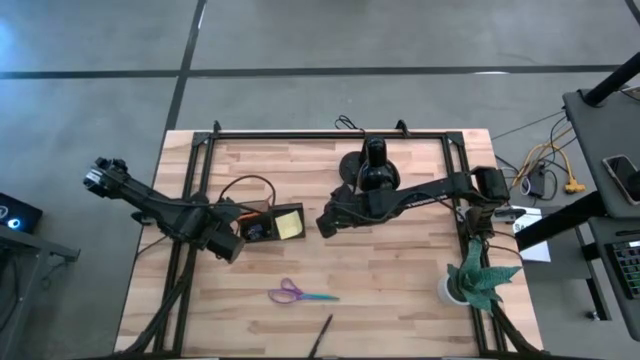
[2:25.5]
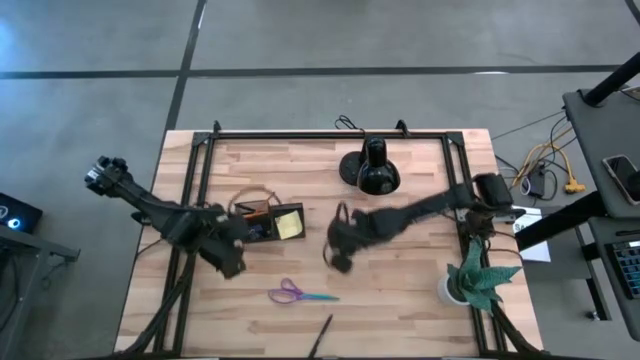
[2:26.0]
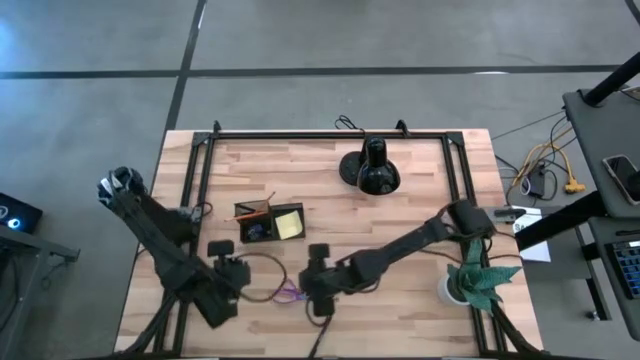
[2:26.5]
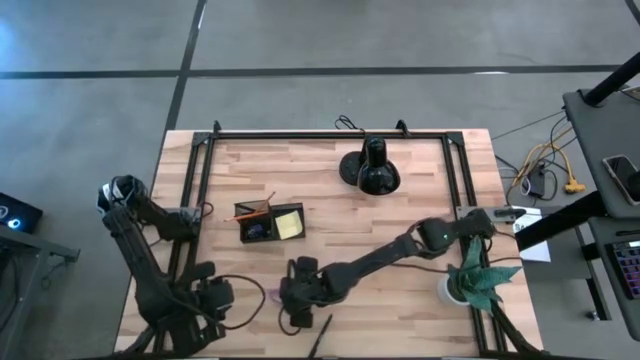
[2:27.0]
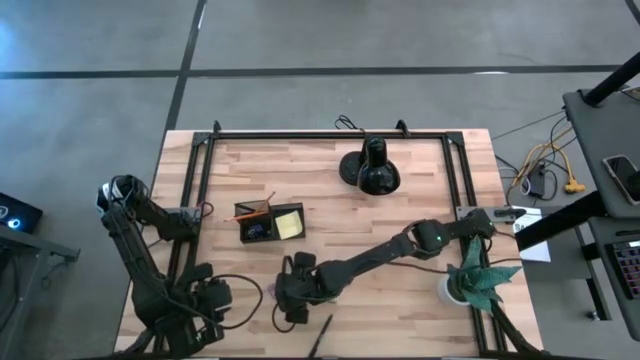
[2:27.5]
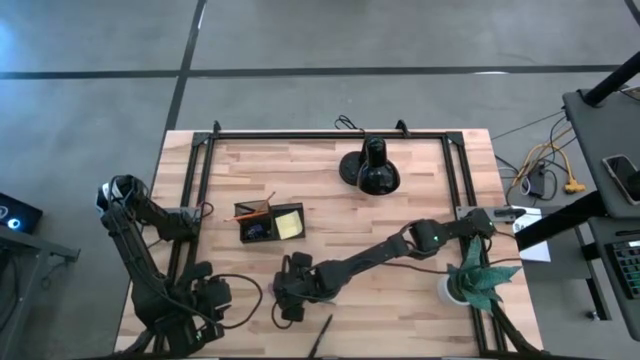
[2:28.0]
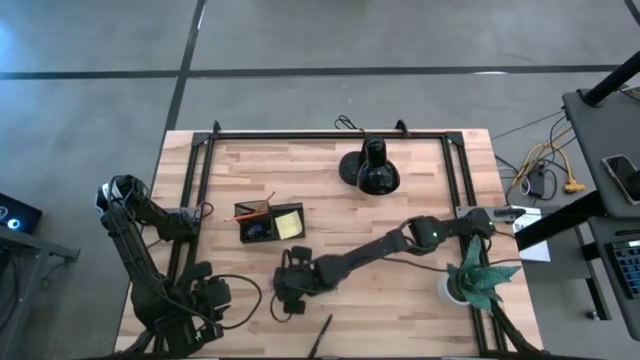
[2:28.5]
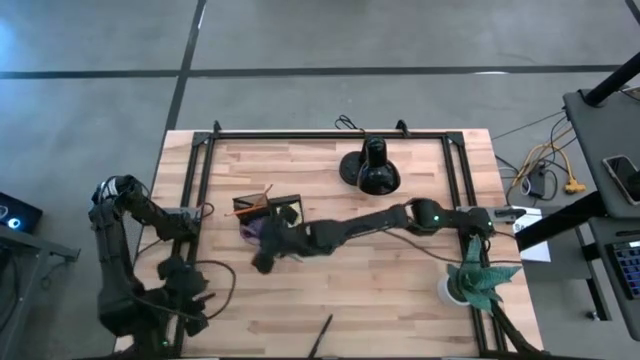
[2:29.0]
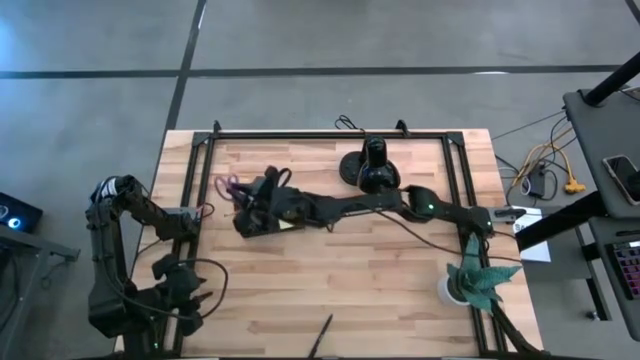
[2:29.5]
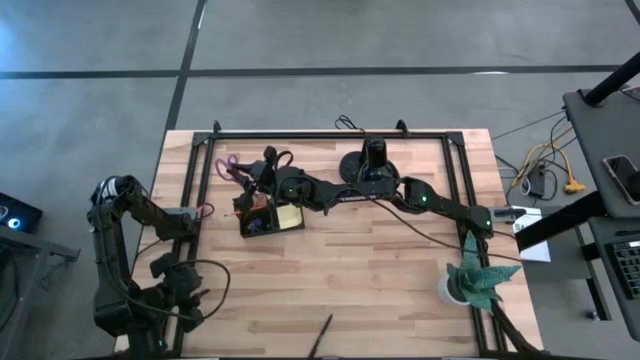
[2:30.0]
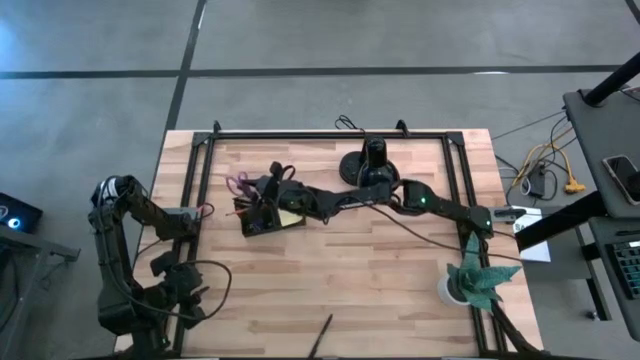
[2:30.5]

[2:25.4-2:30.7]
Task: Pick and place office supplies into organizer
Put the purple scissors into the black desk organizer

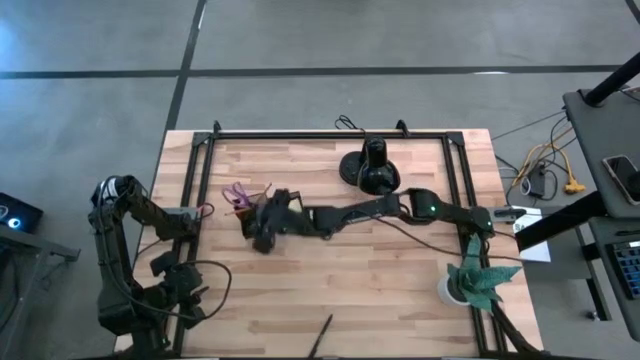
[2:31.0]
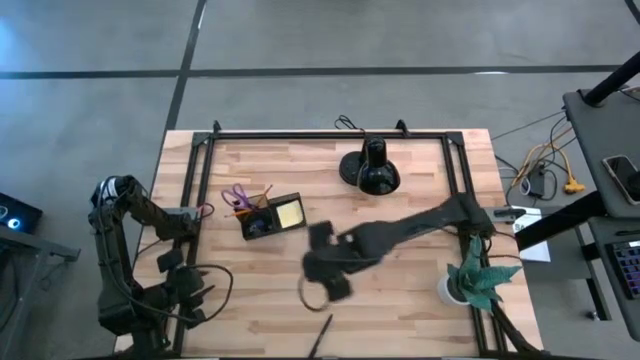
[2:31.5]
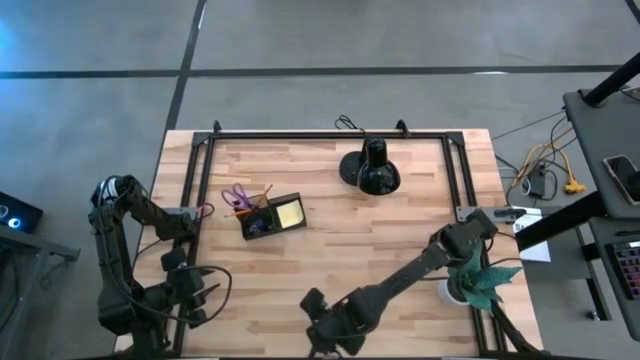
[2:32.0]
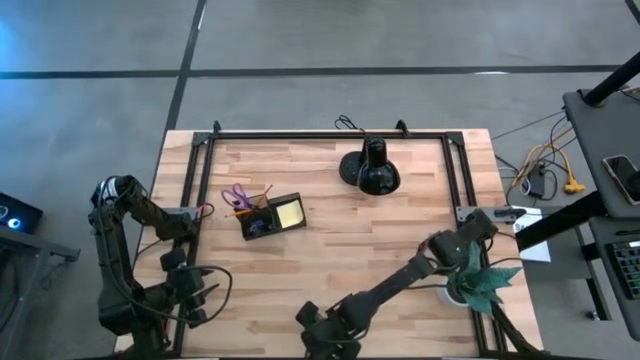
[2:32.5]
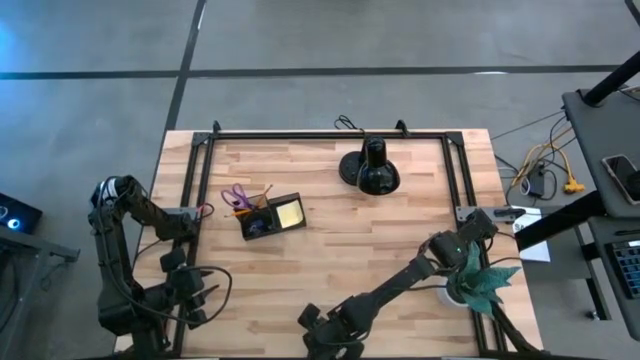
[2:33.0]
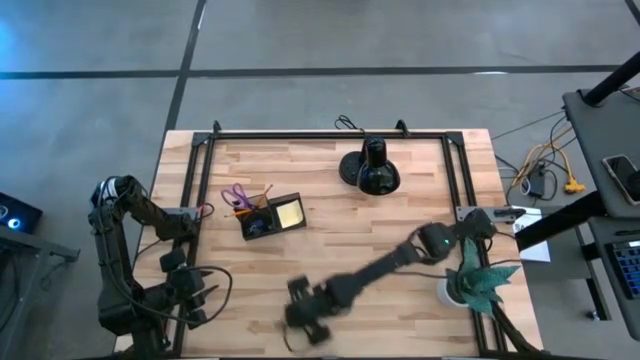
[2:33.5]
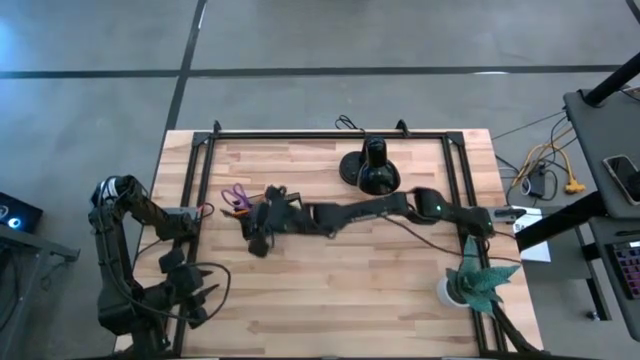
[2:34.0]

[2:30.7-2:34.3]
Put the black pen into the black desk organizer

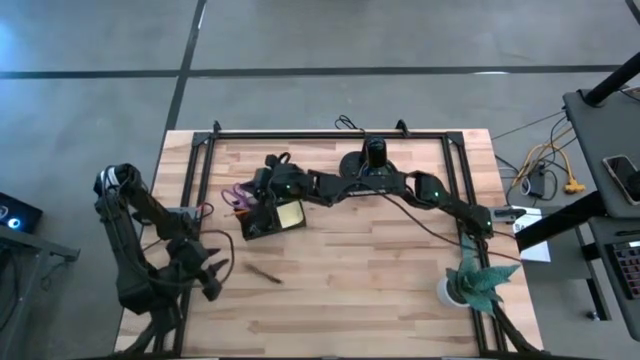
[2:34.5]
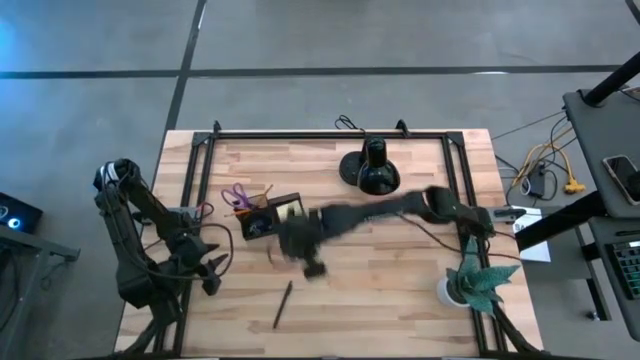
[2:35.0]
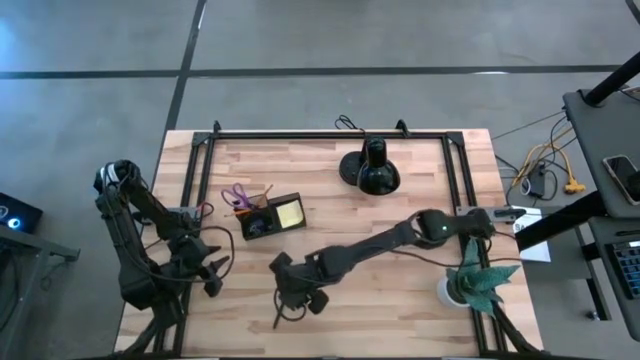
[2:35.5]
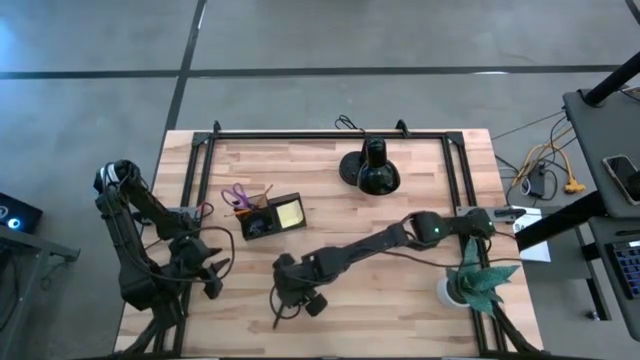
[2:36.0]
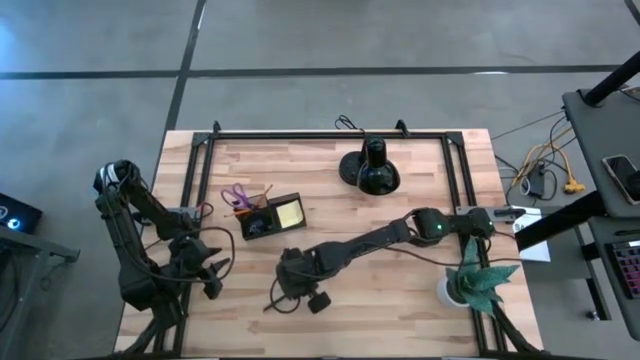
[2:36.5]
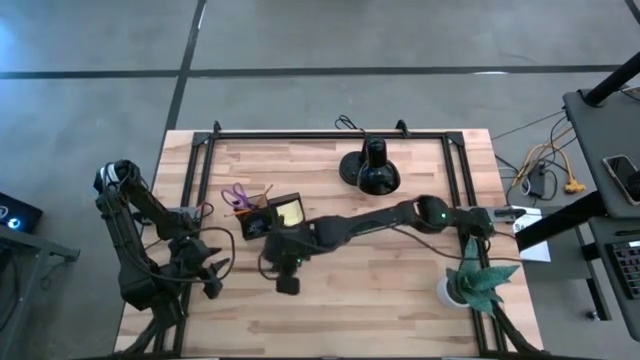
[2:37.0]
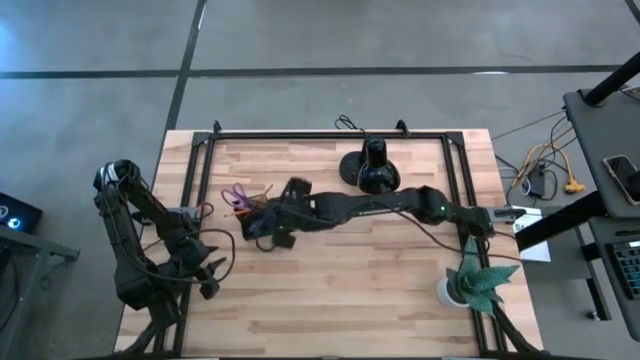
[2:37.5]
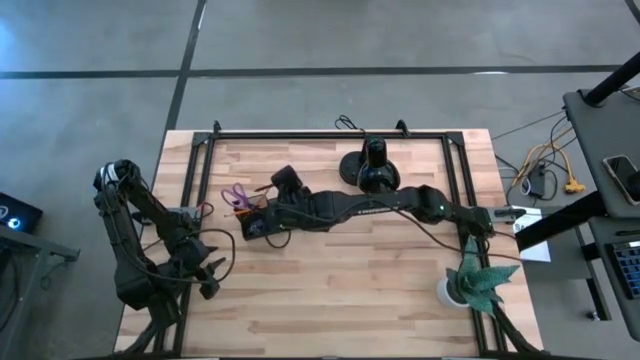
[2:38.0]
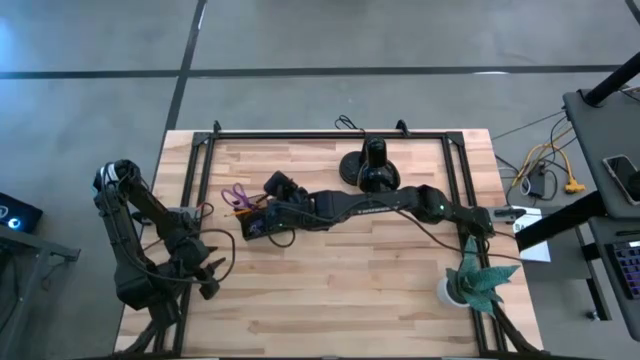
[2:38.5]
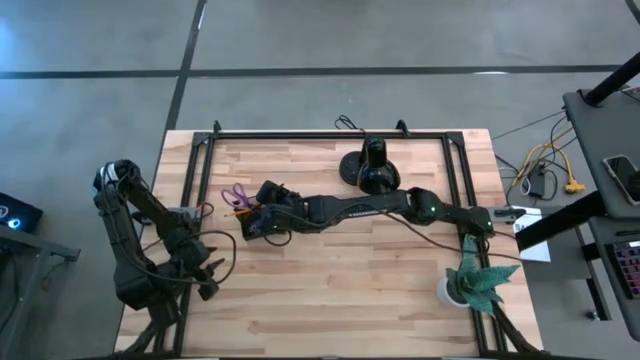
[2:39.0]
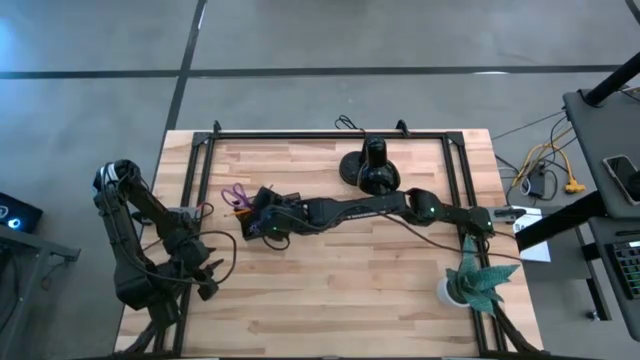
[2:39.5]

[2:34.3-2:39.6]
Put the black pen into the black desk organizer

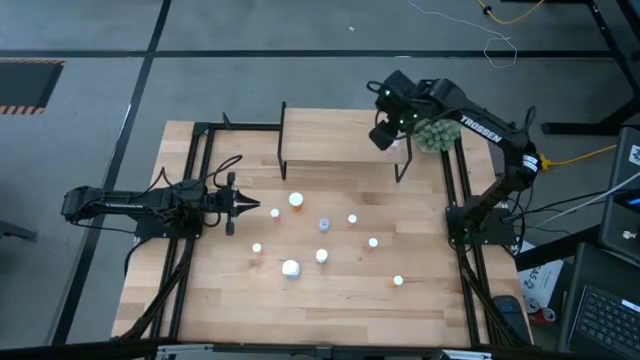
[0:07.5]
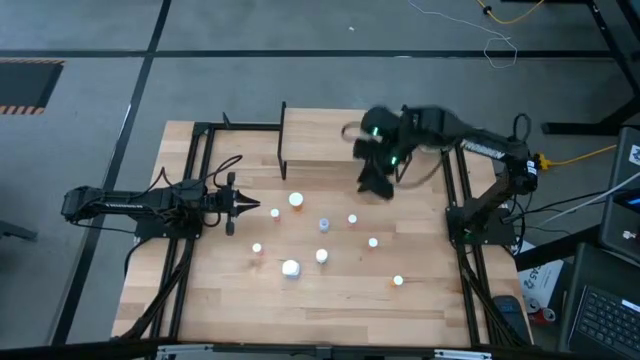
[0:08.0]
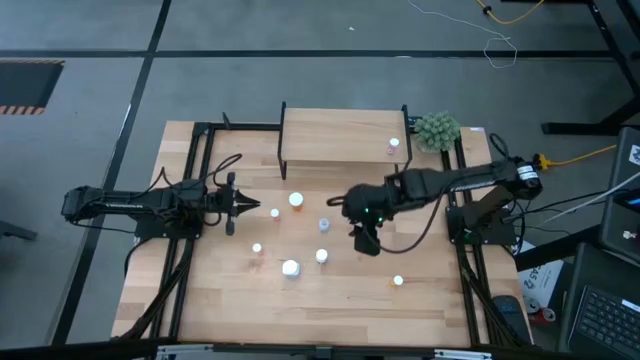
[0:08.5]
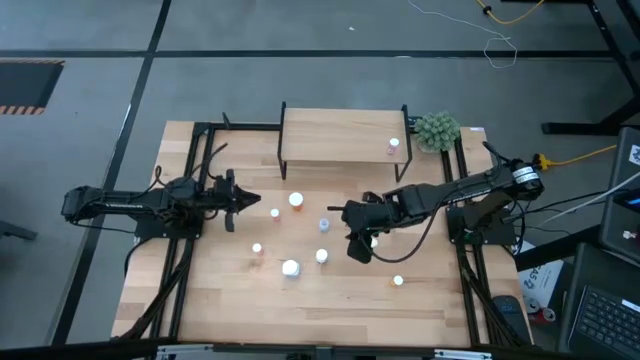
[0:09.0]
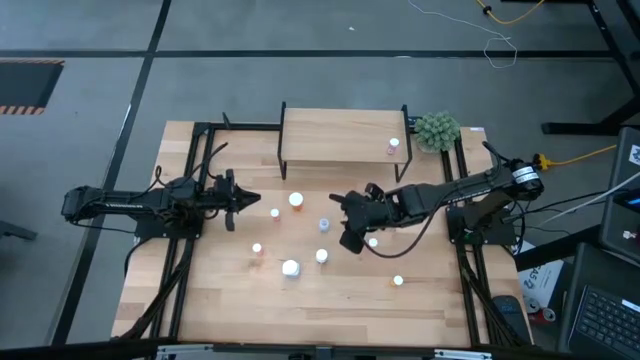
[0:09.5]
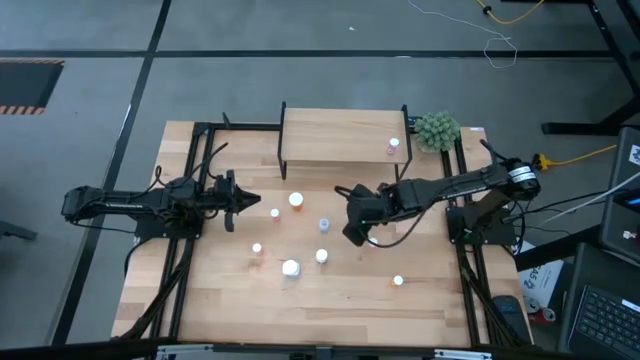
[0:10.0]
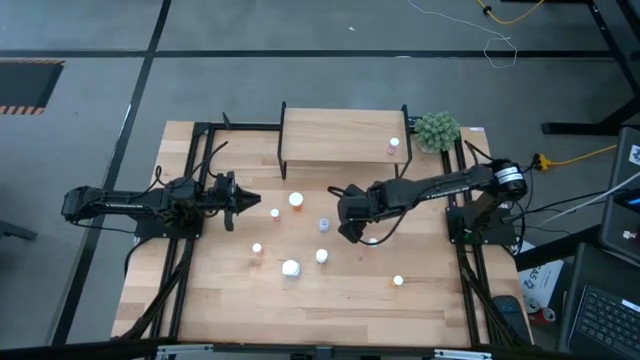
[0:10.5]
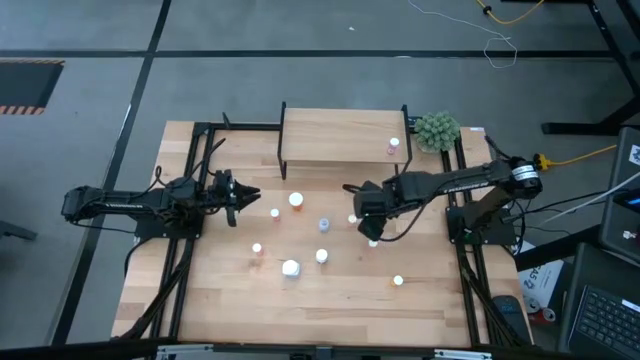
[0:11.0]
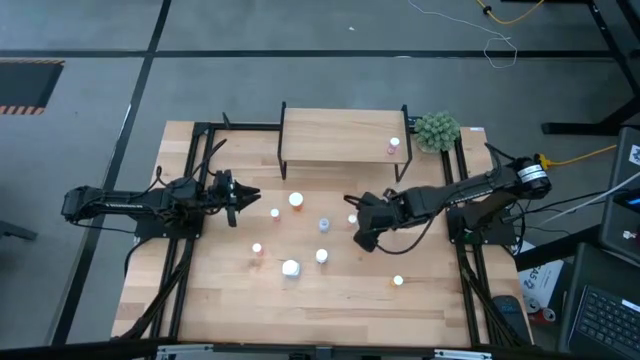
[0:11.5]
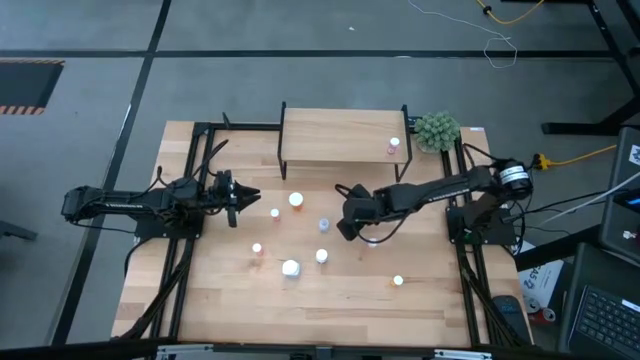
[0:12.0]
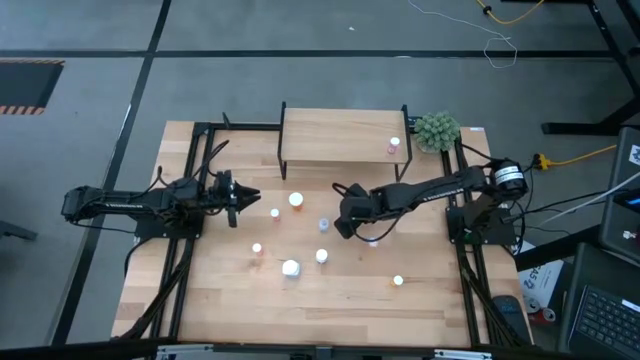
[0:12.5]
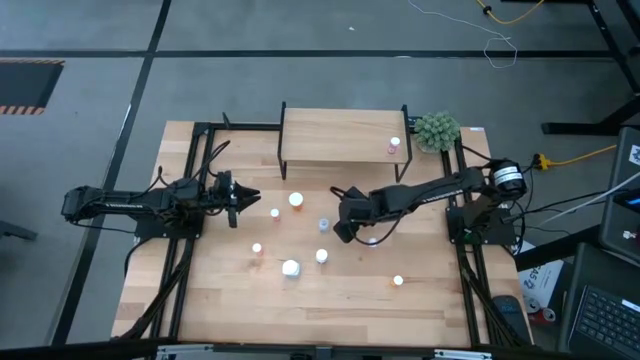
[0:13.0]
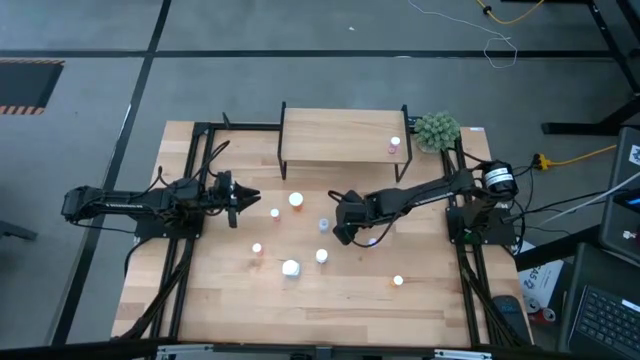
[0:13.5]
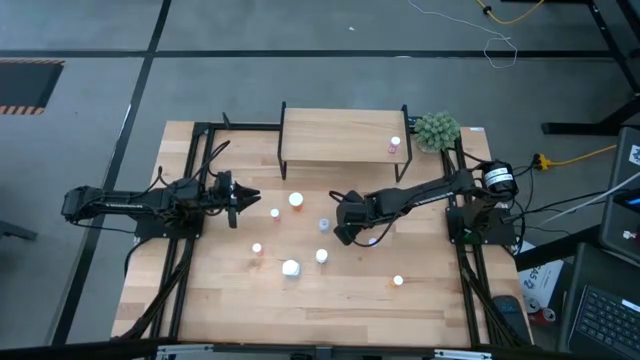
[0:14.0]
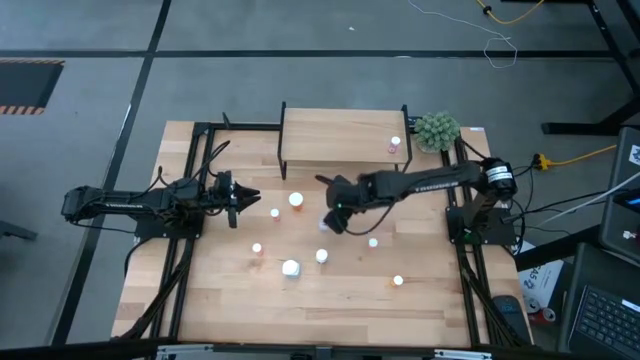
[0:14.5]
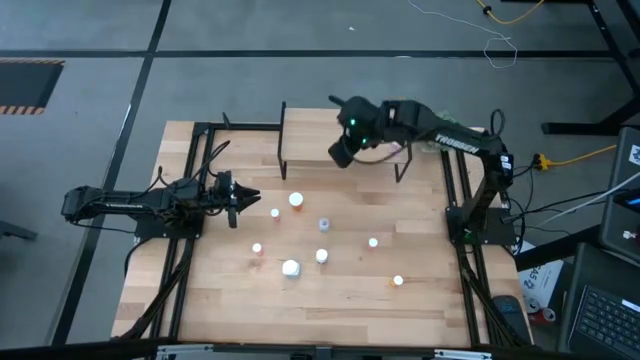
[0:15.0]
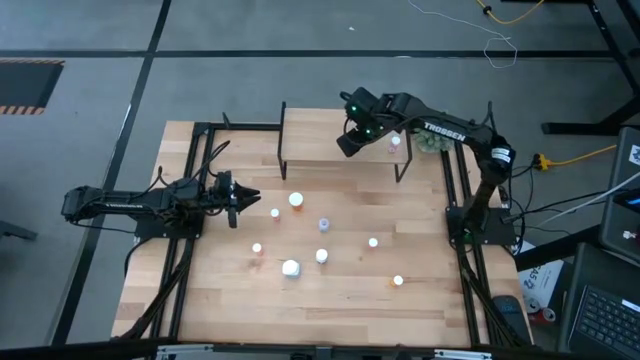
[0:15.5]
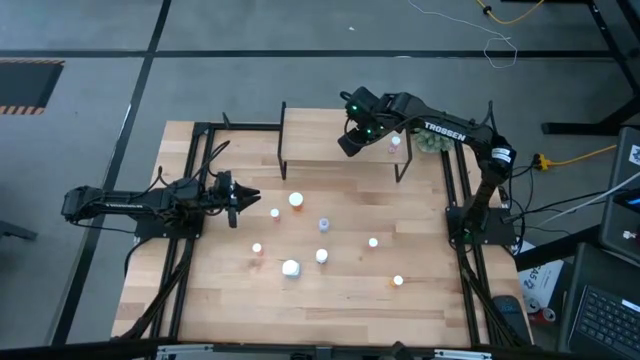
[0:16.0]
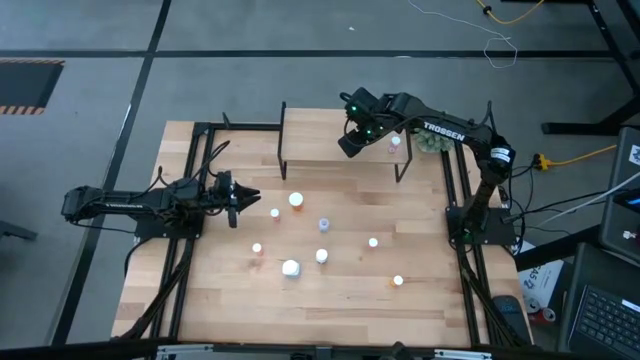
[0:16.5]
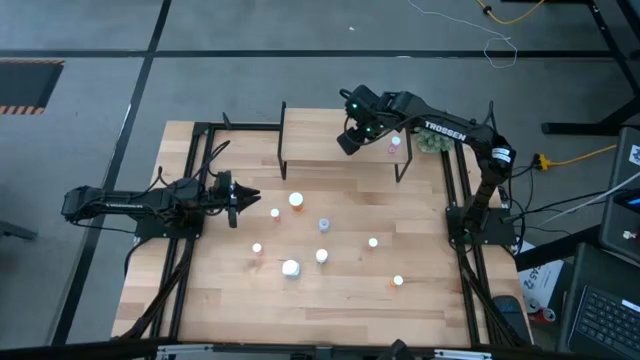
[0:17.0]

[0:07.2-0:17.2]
Task: Pick and place medicine bottles onto shelf by color
Put the orange pill bottle on the shelf
